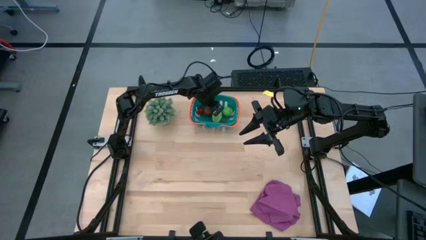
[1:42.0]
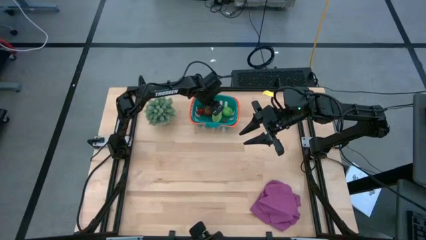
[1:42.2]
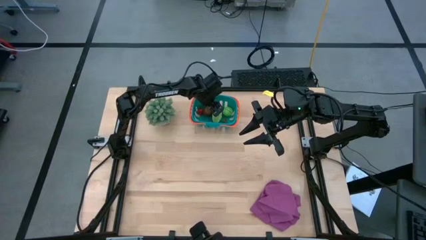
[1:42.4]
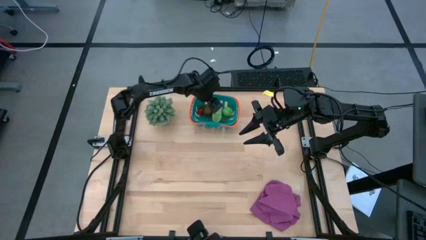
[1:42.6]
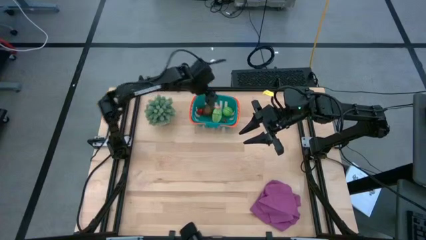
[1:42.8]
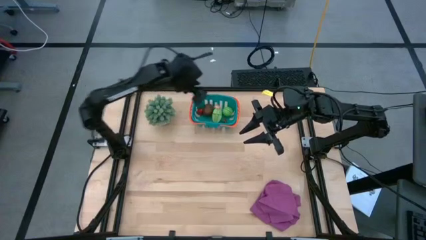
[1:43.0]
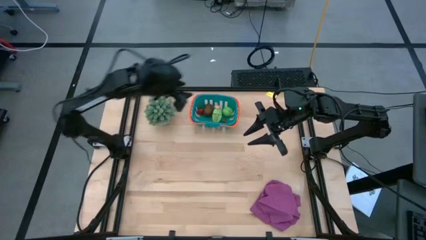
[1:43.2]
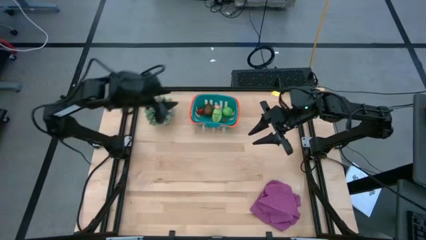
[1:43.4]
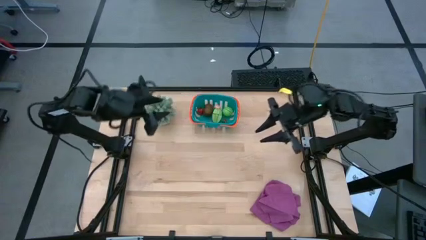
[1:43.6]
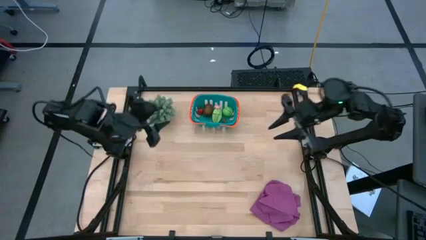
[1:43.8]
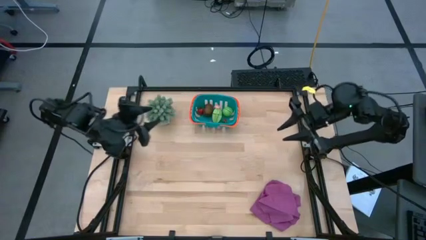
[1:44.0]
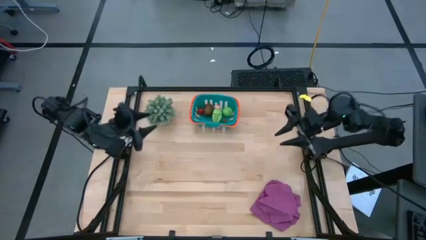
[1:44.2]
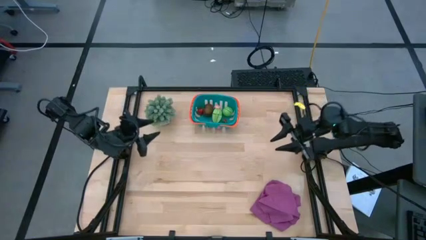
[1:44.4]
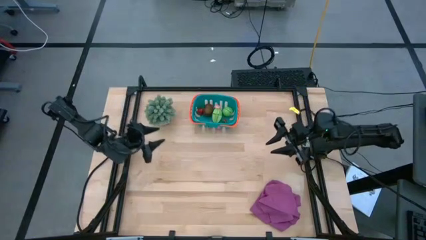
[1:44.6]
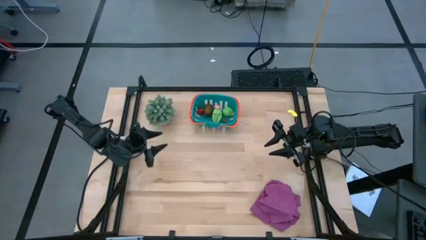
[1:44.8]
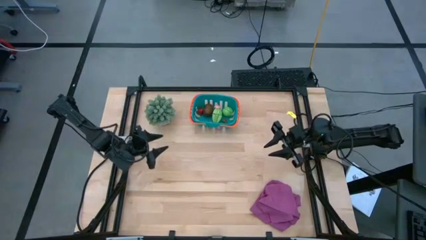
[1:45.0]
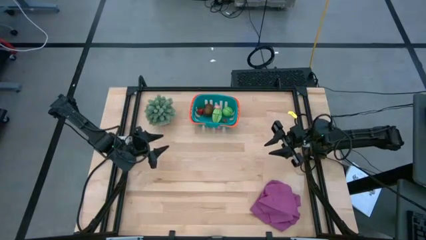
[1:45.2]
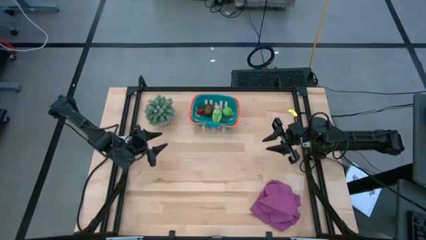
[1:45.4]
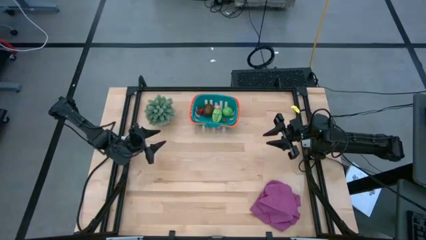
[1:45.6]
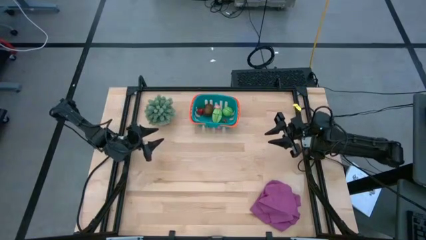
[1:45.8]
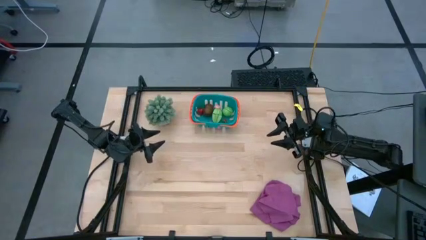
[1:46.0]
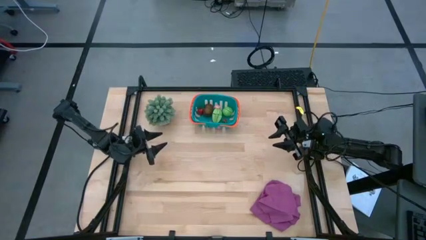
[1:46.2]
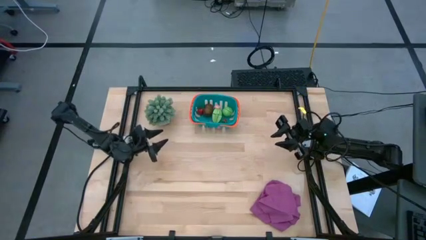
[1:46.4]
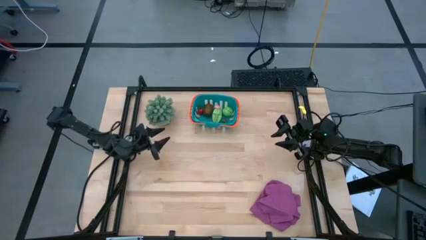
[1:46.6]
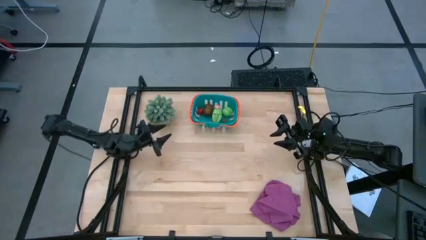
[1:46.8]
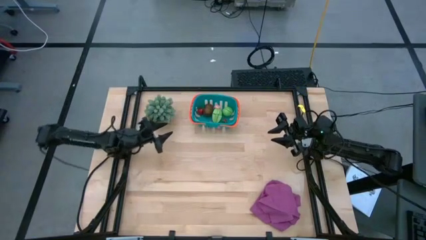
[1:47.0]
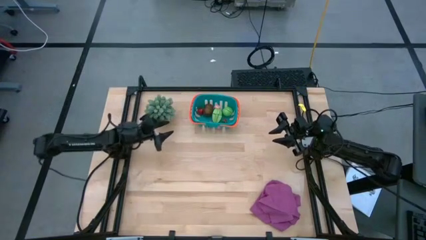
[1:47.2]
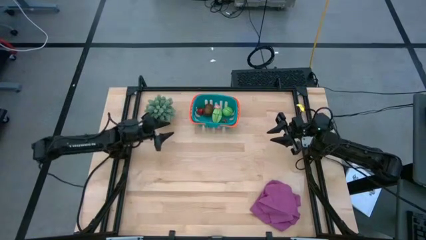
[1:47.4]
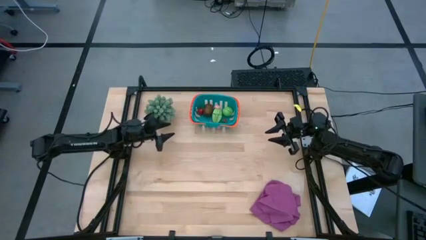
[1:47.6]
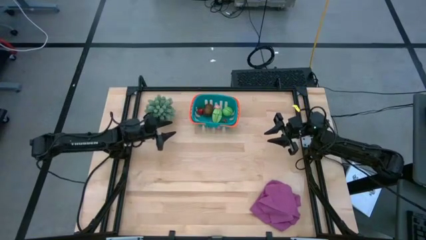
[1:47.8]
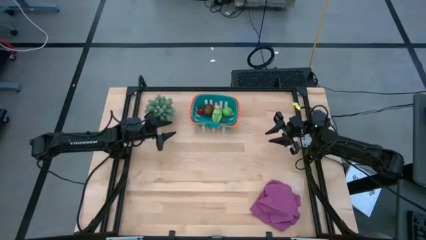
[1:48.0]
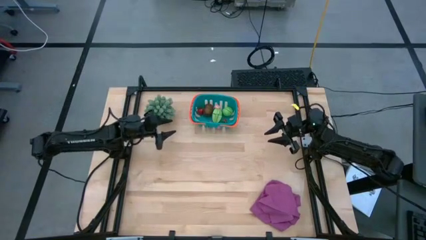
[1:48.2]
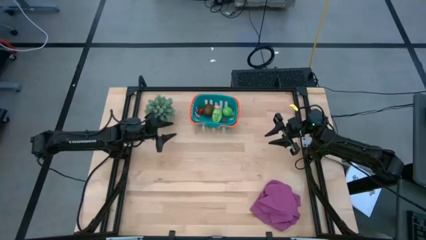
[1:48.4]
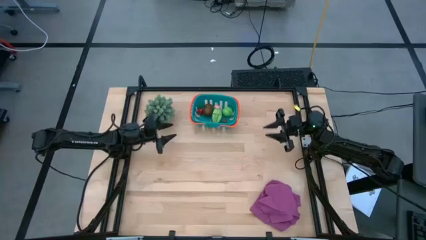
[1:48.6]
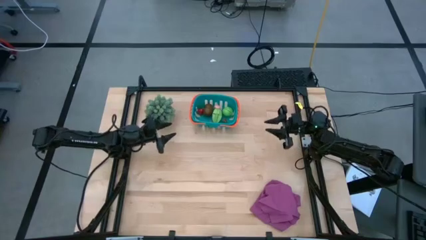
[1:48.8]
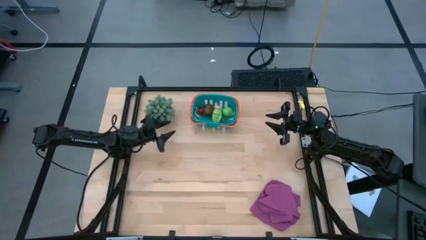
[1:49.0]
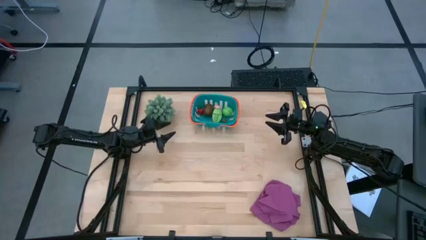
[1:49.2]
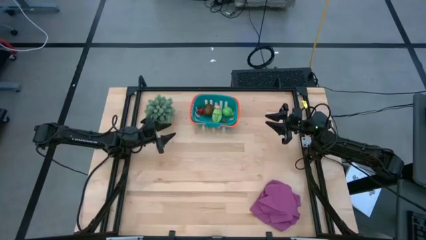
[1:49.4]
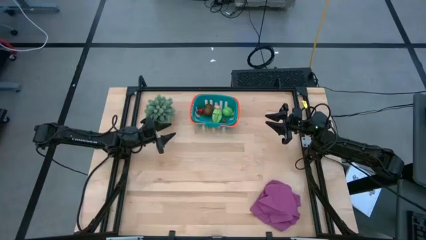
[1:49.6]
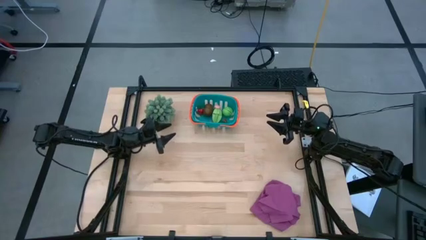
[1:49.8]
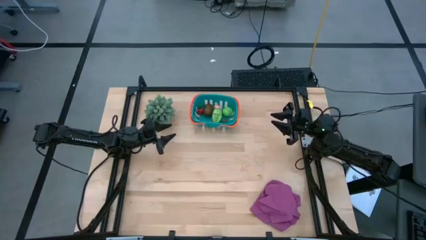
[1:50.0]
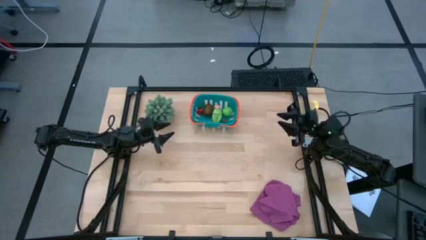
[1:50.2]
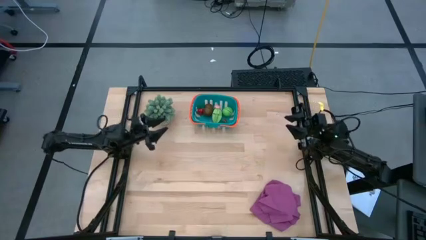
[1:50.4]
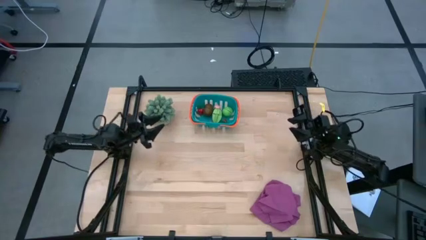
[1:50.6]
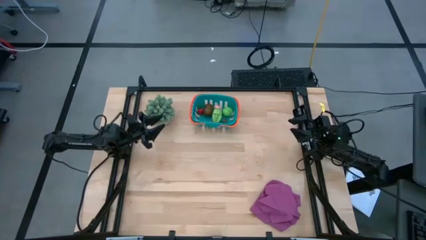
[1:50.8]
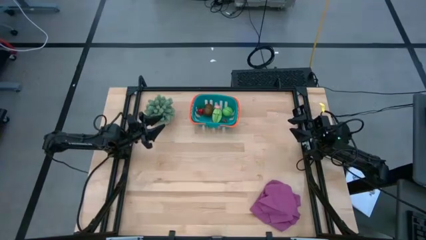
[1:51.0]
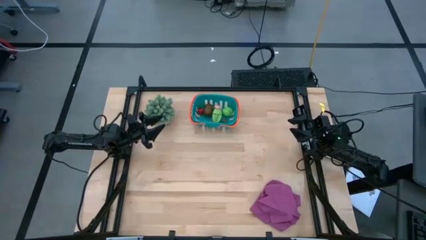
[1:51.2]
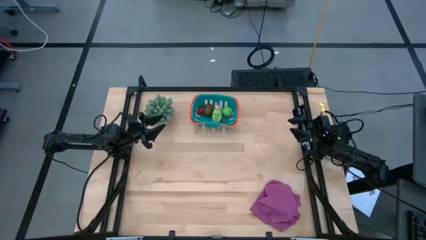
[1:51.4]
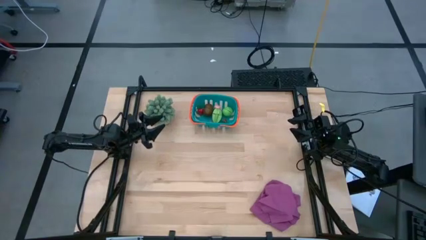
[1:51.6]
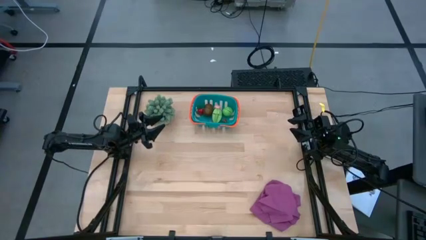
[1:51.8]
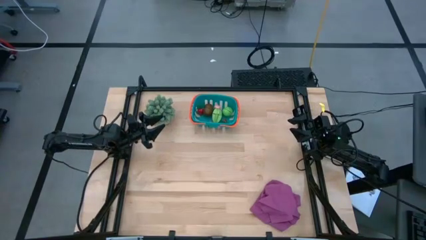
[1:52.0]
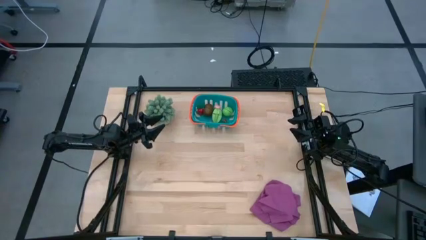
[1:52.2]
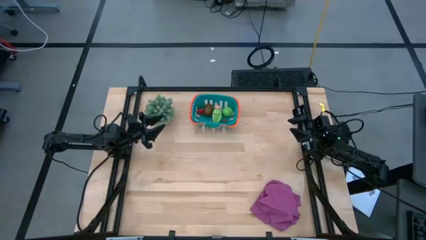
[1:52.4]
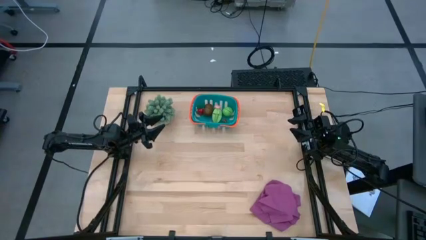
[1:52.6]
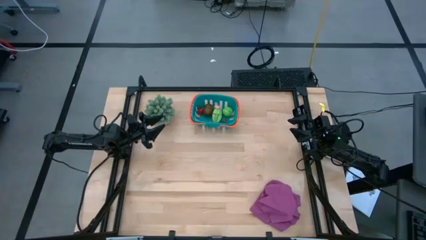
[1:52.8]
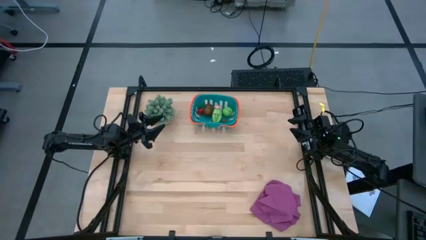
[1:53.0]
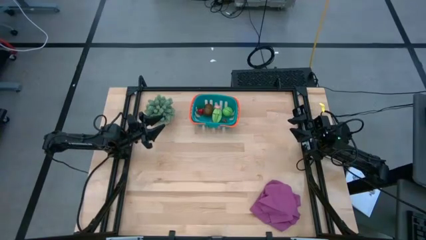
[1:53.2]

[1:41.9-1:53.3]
Task: Pick and placing Produce into tupperware
Return to Home Position
